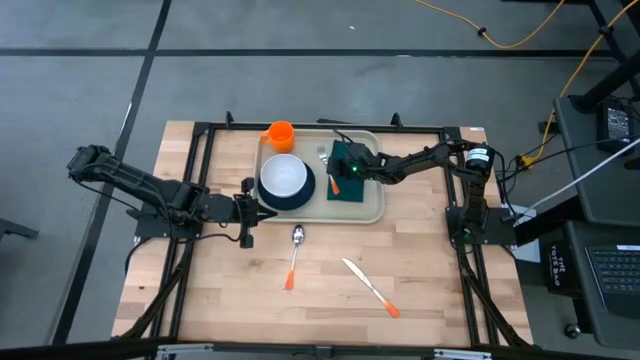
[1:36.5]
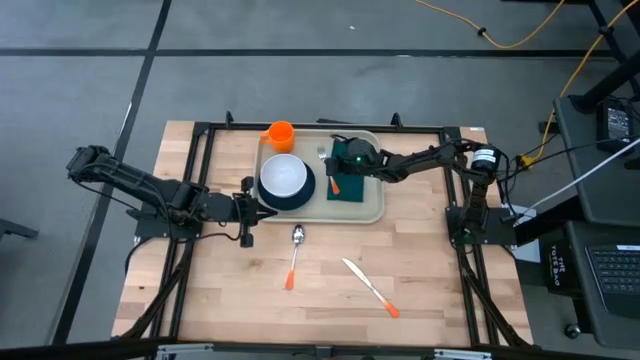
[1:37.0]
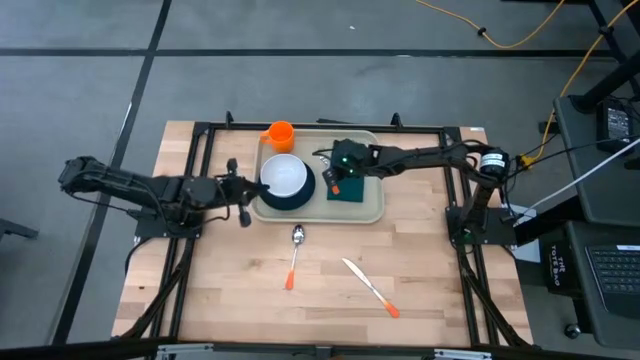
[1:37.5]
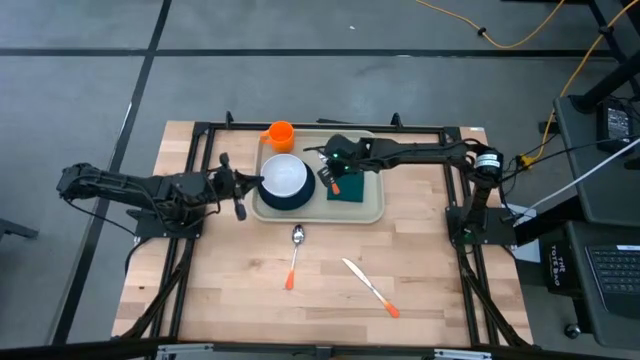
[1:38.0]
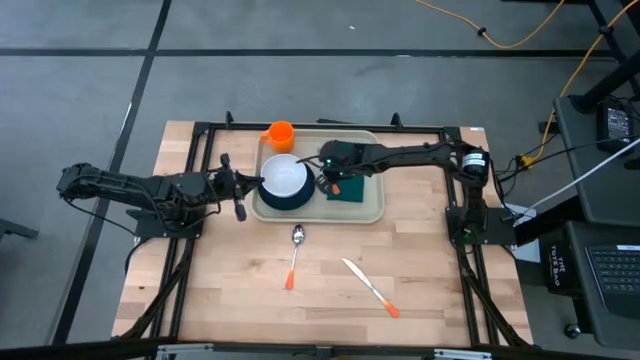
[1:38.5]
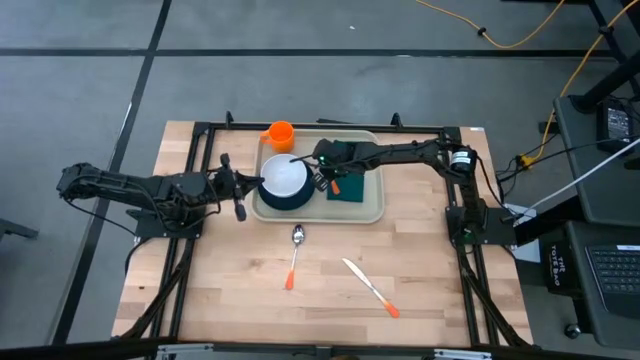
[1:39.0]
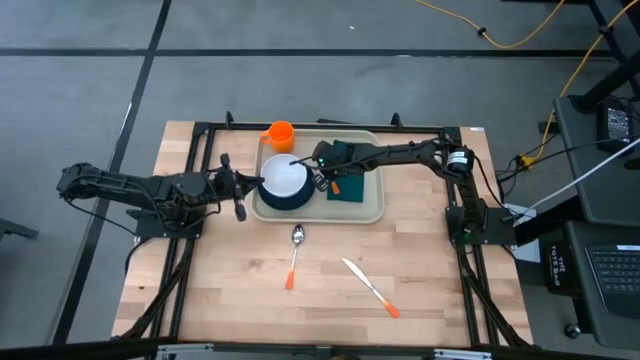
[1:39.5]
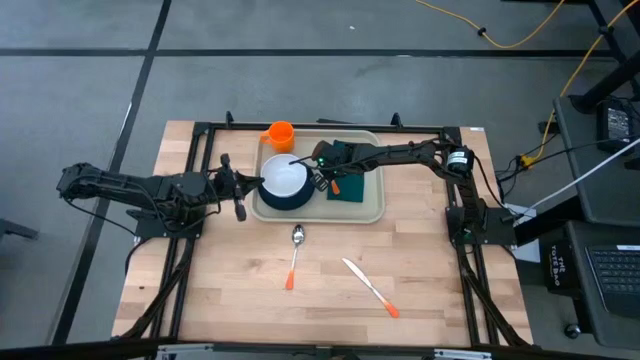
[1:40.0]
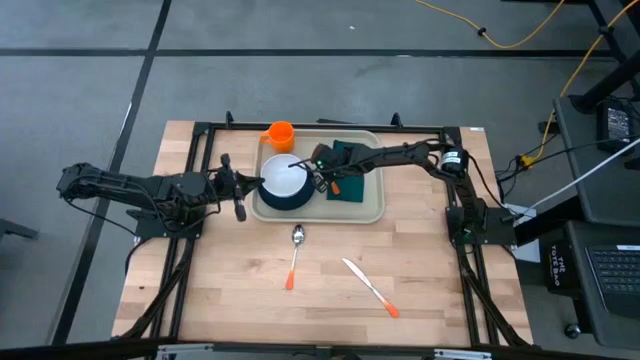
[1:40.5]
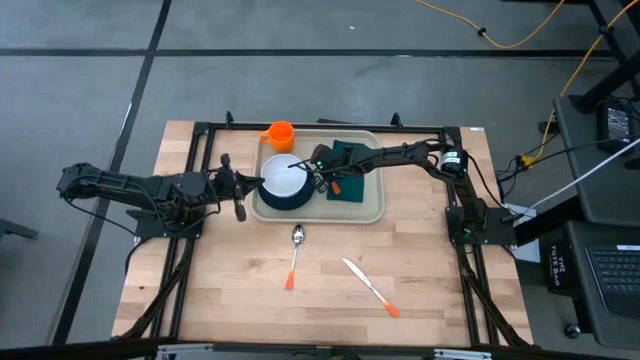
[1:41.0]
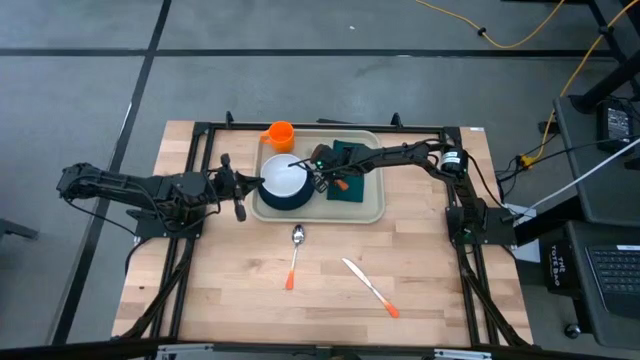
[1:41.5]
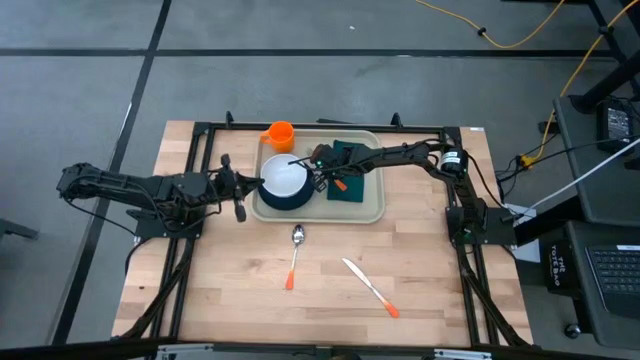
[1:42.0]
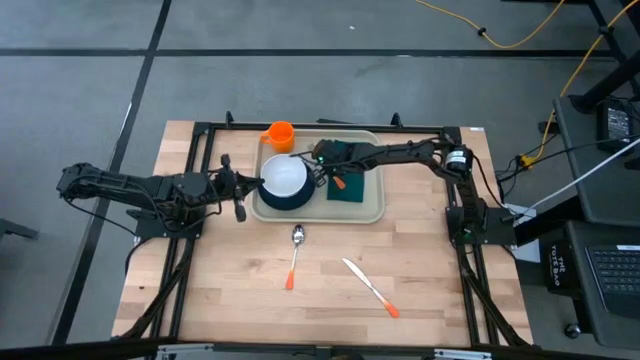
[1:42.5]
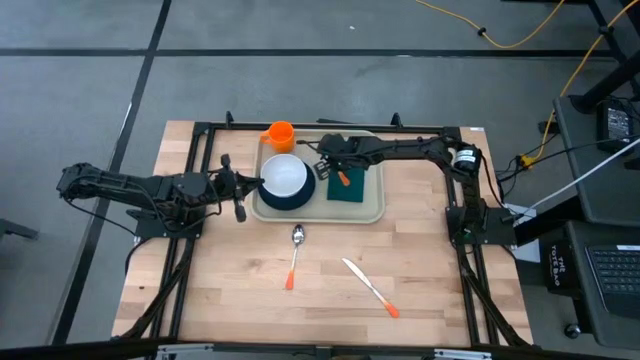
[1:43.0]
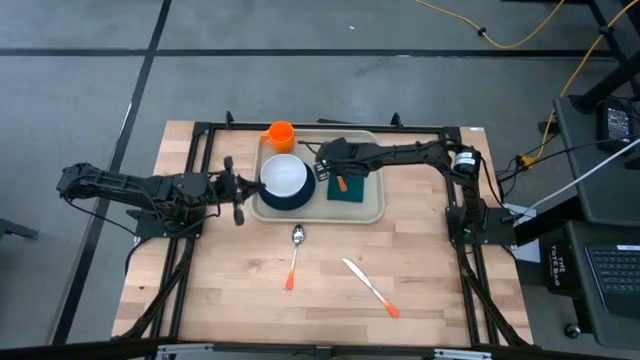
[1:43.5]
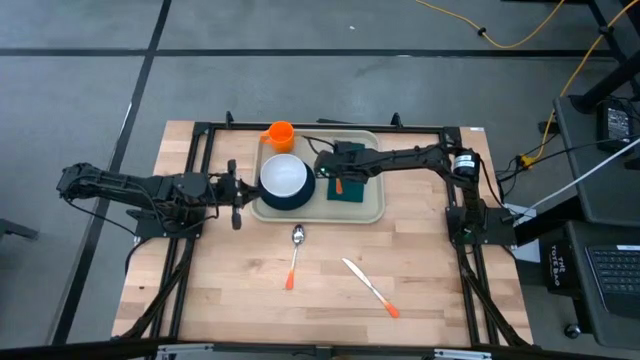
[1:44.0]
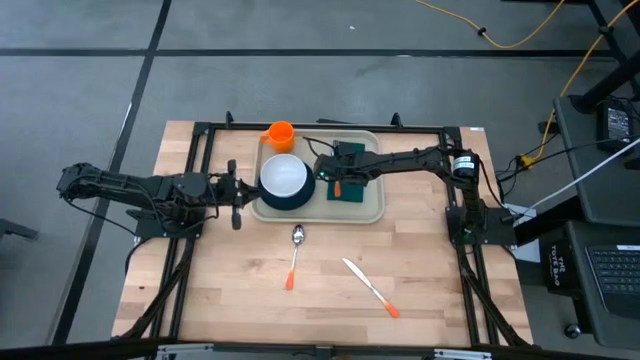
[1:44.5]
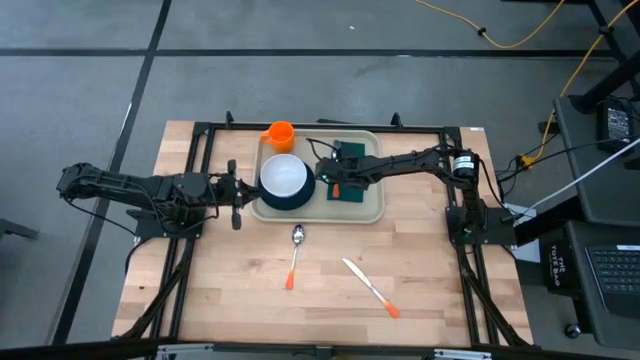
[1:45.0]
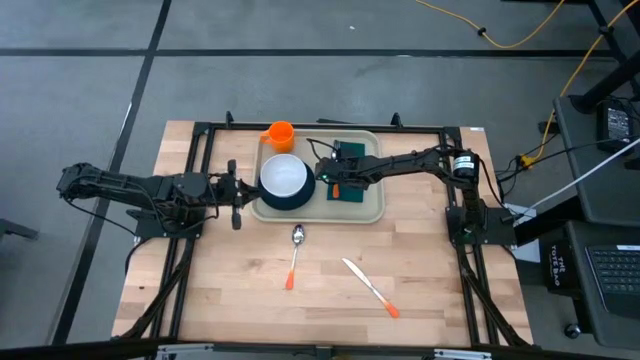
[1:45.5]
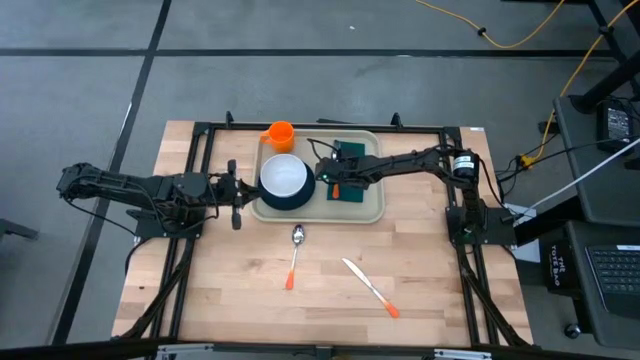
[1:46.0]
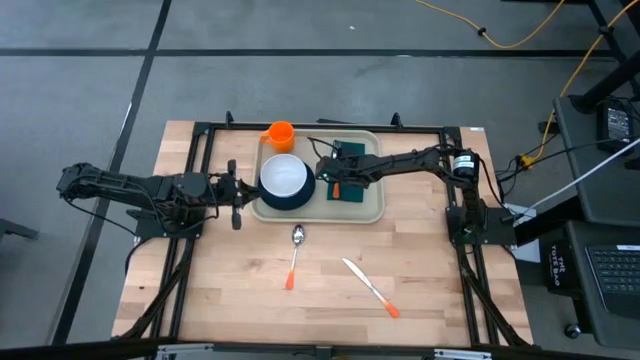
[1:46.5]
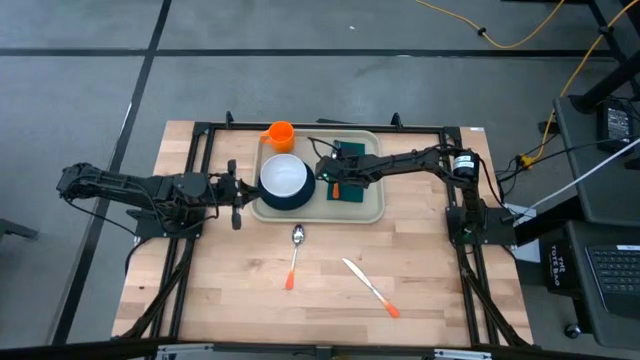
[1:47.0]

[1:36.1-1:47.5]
Task: Set up tray
Put the orange fork on top of the green table napkin on the brown serving tray

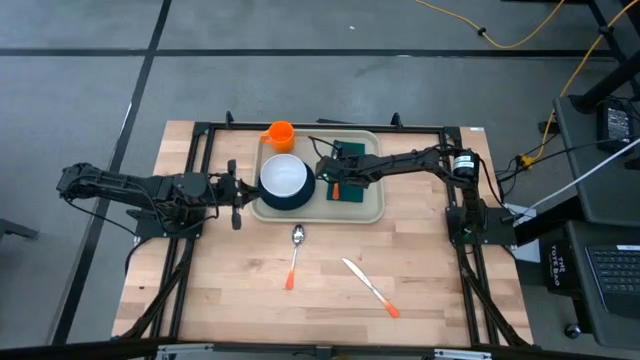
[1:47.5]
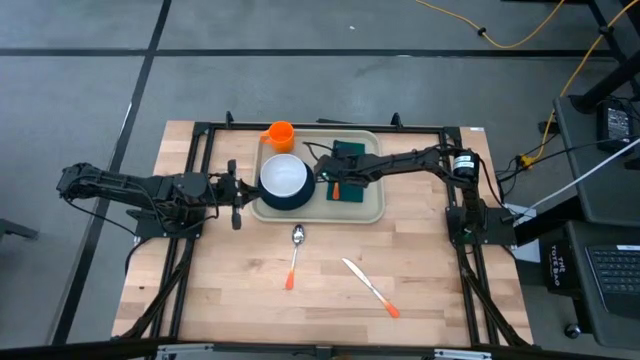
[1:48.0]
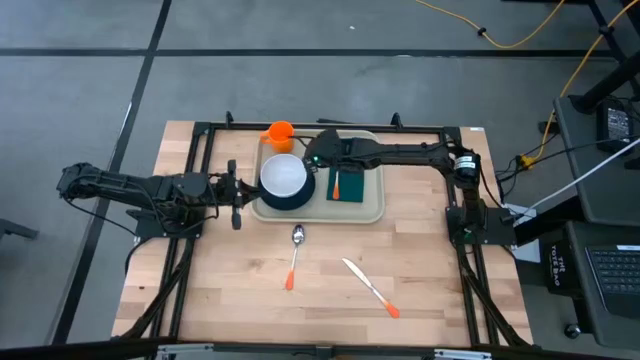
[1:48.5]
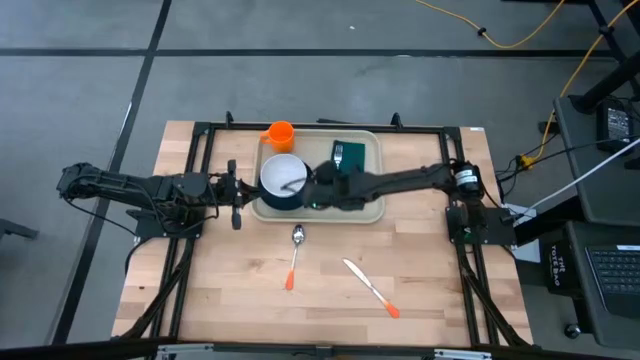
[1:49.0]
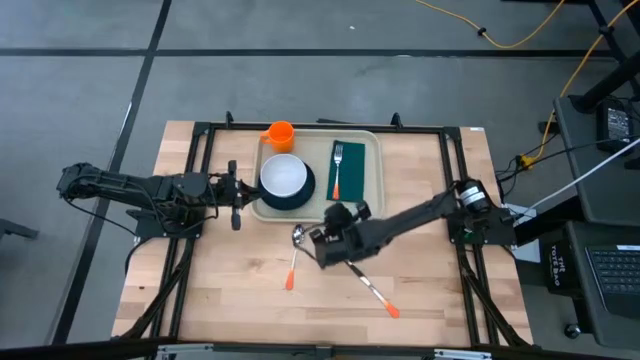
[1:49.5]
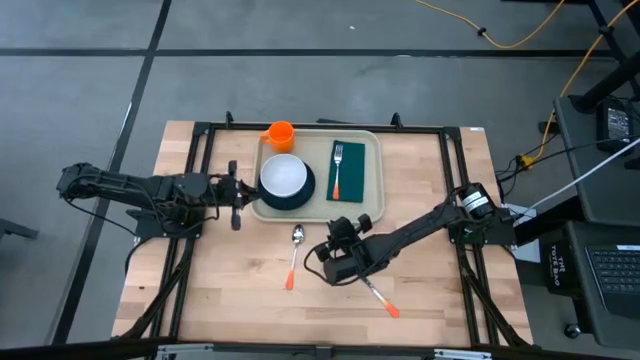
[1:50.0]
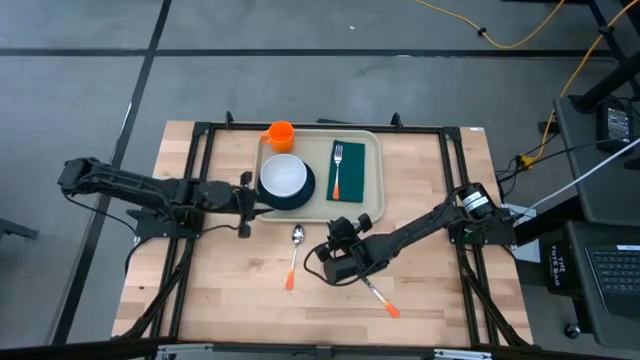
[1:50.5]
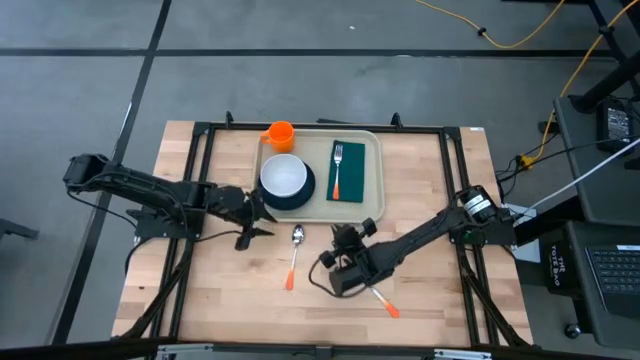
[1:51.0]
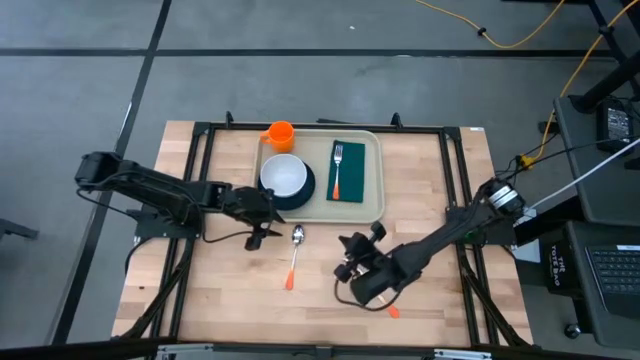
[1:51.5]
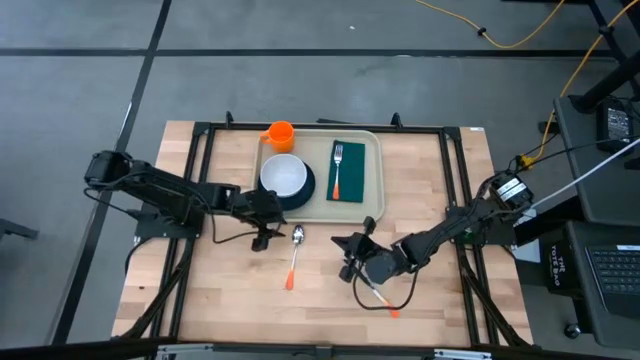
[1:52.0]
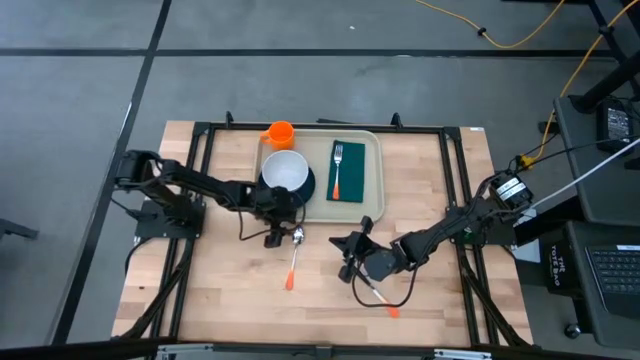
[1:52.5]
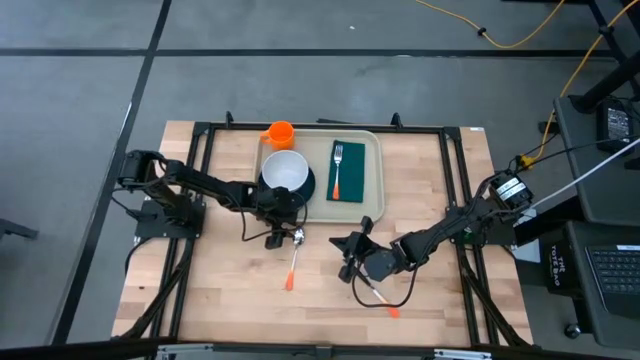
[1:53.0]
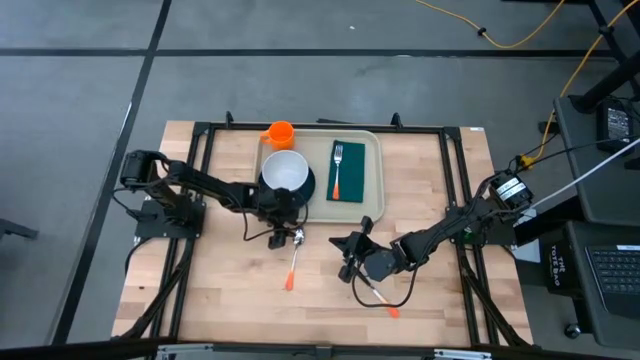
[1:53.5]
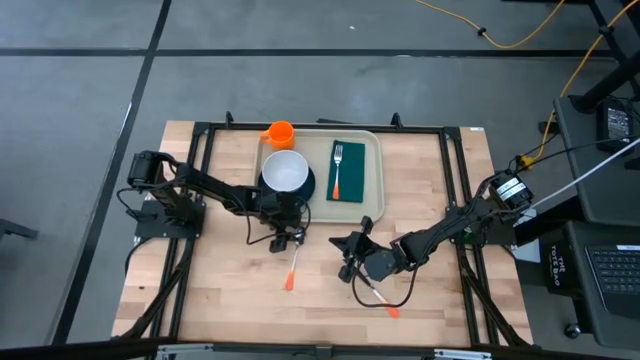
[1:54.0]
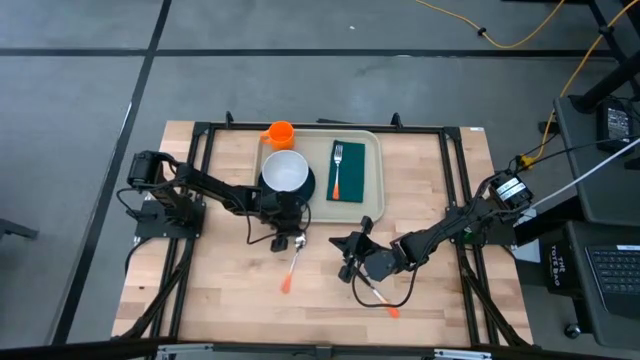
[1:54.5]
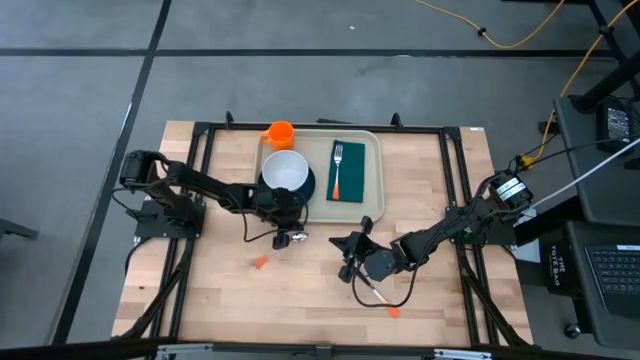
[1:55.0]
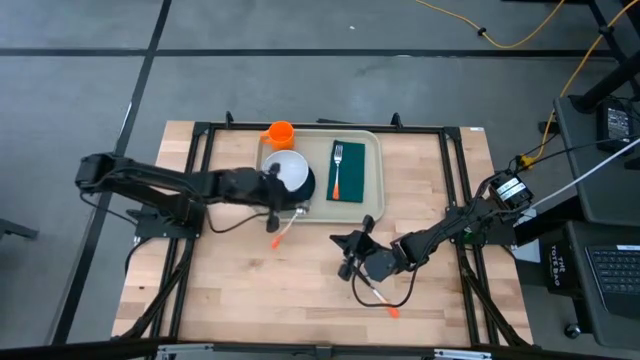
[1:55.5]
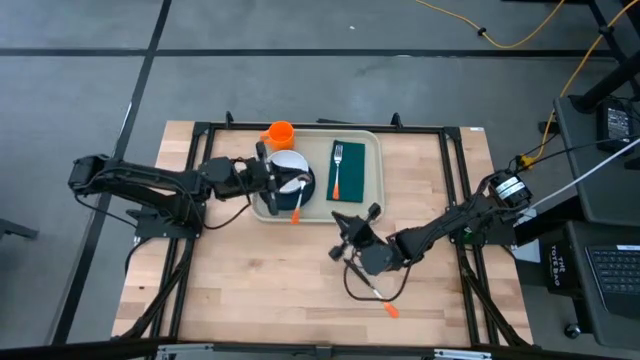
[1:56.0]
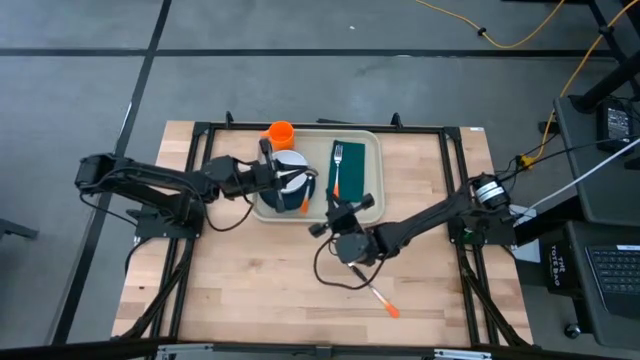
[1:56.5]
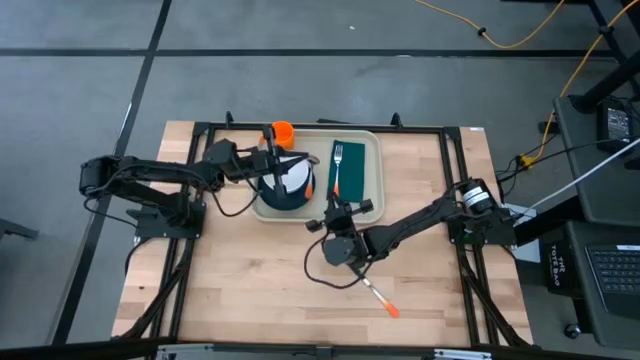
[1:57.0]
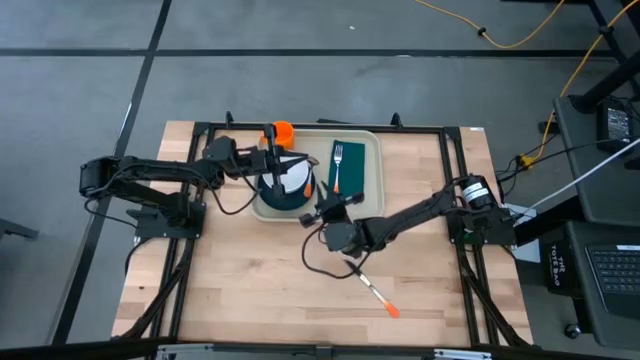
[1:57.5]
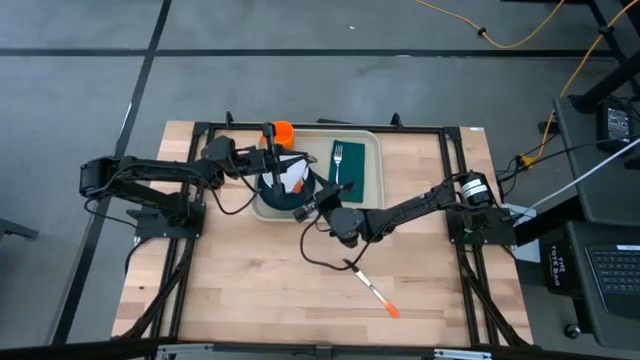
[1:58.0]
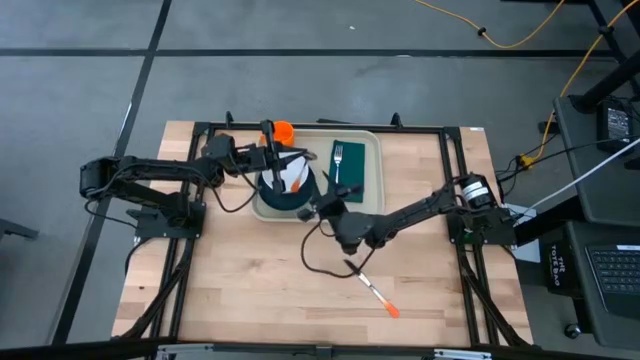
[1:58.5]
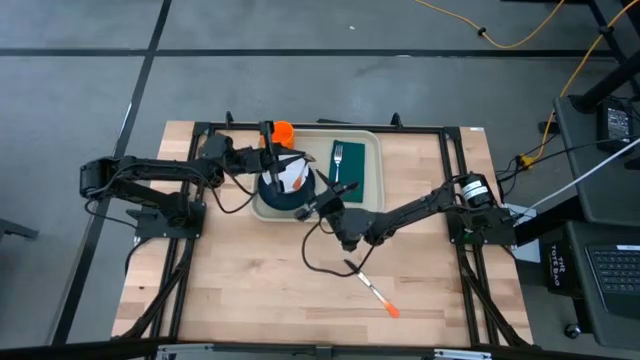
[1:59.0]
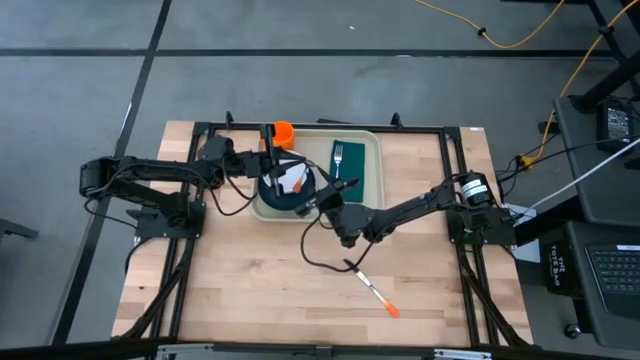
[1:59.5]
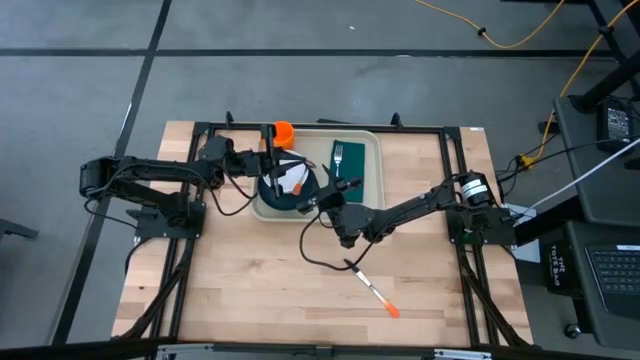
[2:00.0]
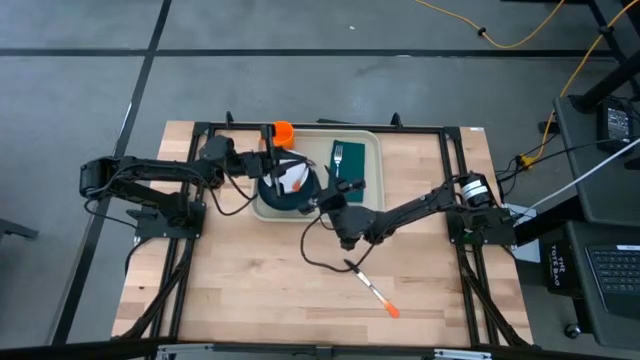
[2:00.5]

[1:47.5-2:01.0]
Put the orange spoon on top of the green table napkin on the brown serving tray to the right of the orange fork
